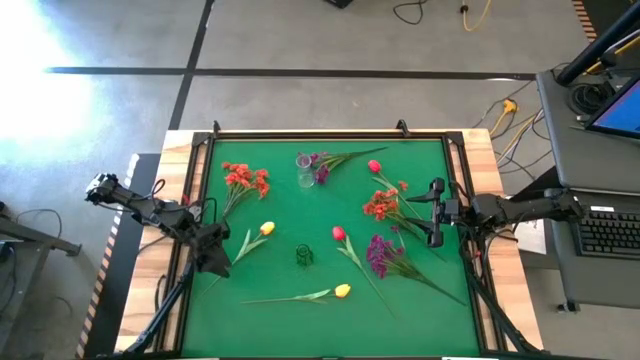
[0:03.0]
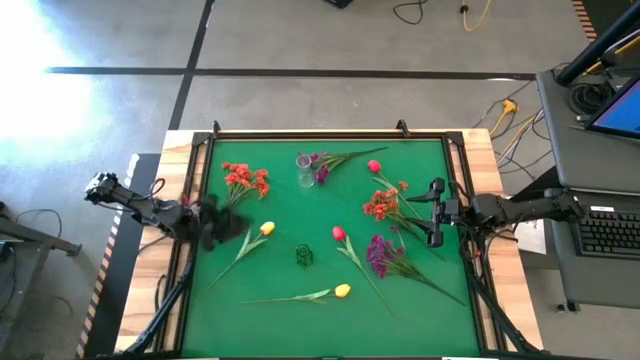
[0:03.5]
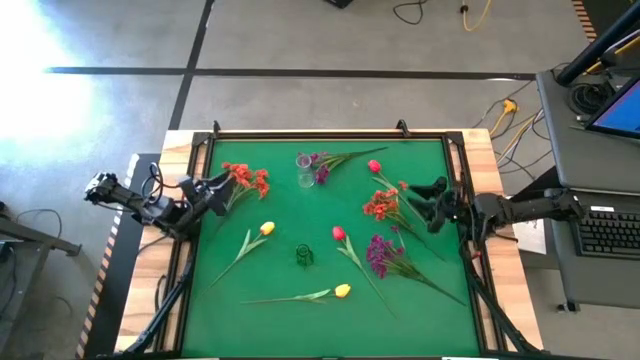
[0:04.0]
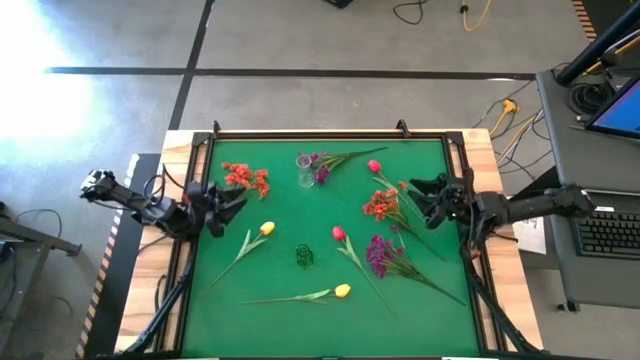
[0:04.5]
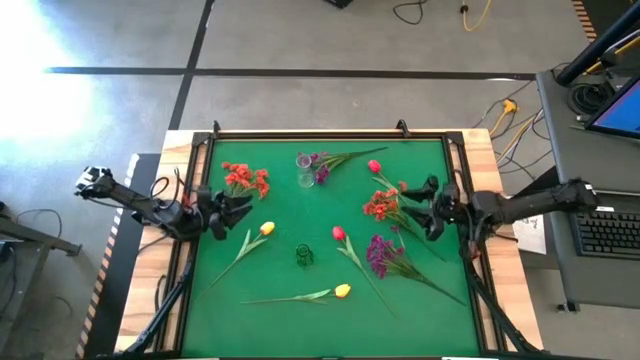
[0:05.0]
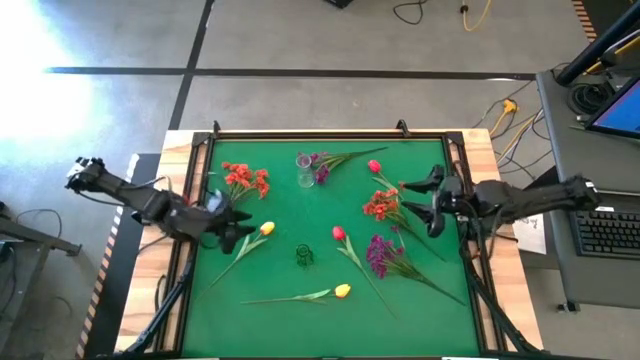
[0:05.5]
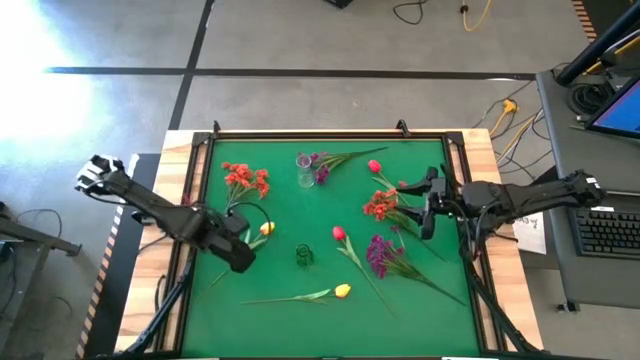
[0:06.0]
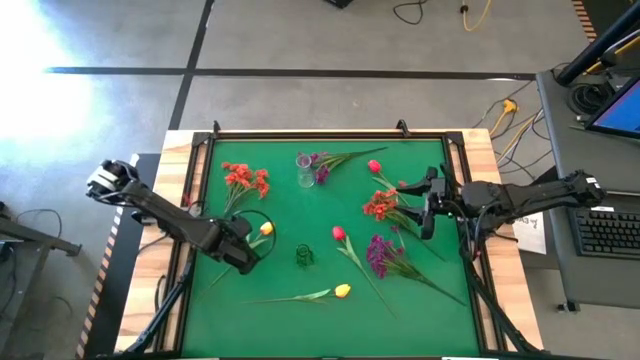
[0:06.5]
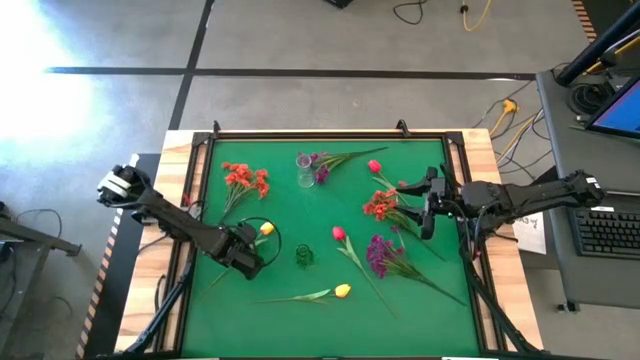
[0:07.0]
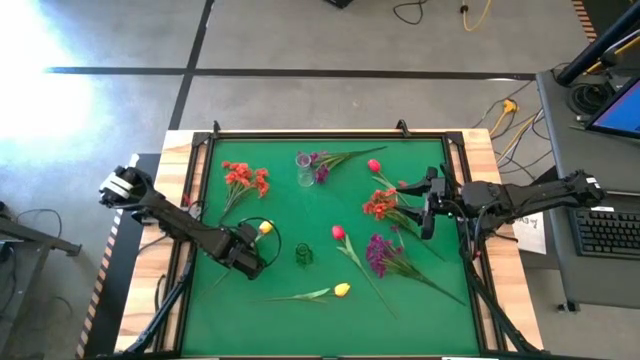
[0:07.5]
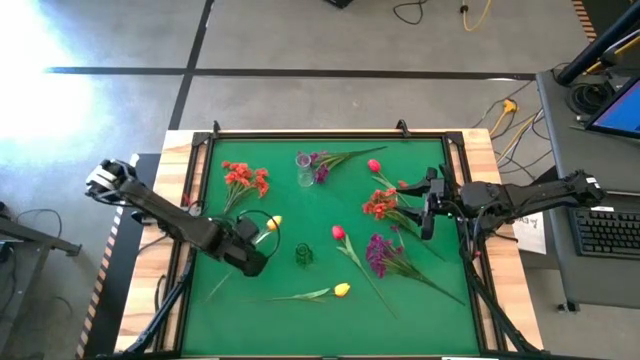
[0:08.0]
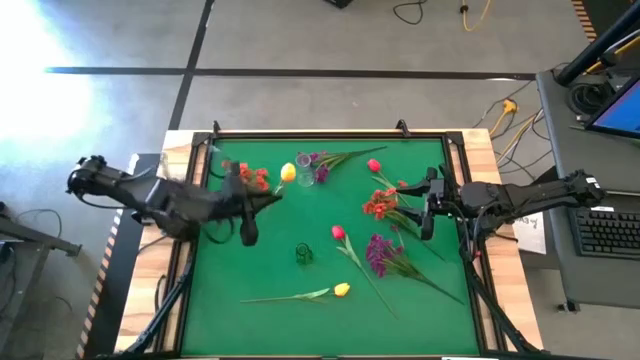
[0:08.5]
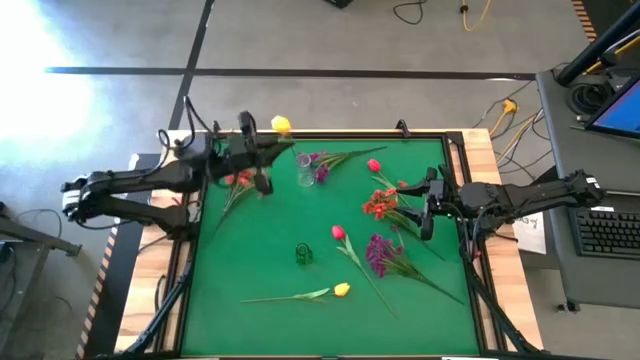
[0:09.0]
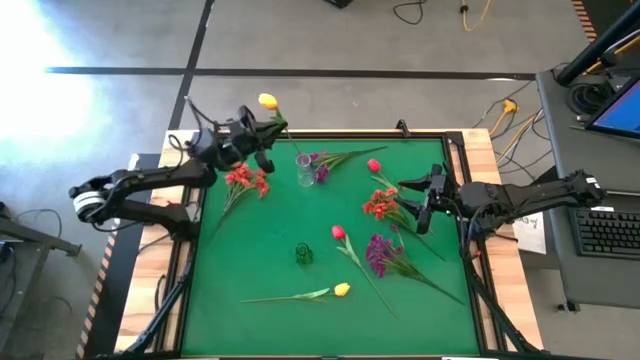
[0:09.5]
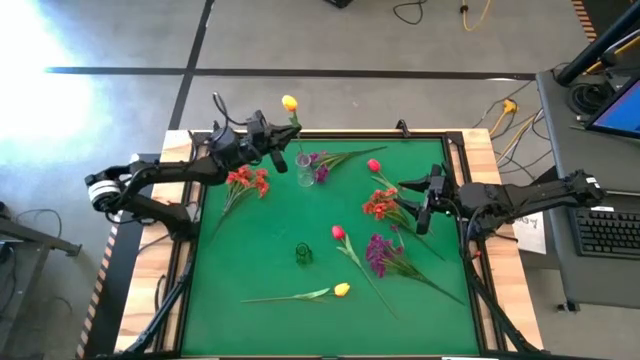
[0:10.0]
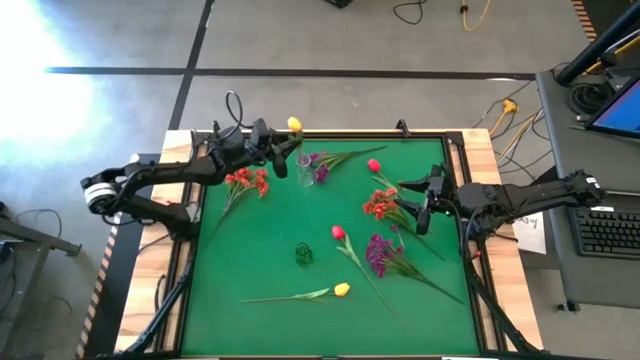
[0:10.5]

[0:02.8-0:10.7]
Task: Sort flowers into vase by color
Put the top yellow tulip into the transparent vase

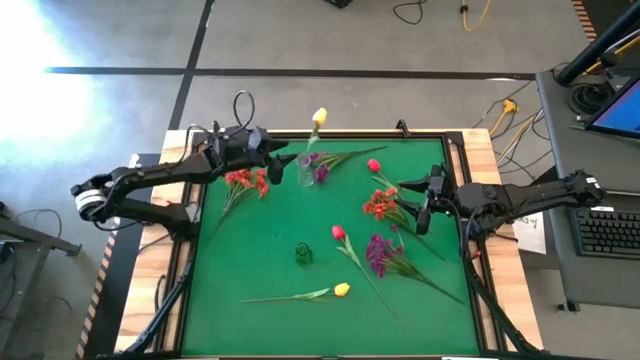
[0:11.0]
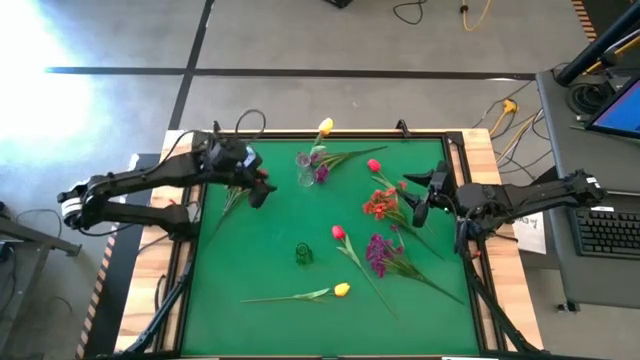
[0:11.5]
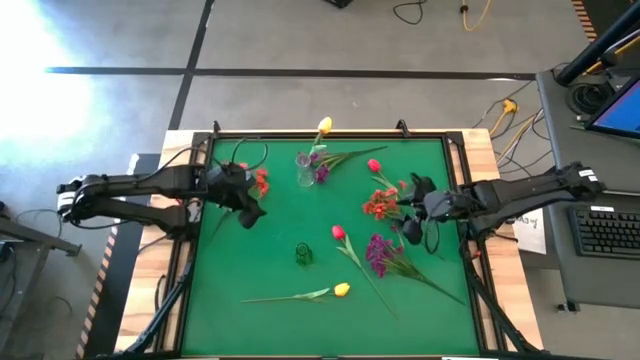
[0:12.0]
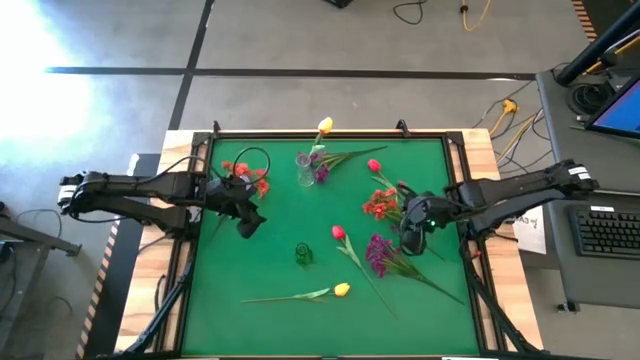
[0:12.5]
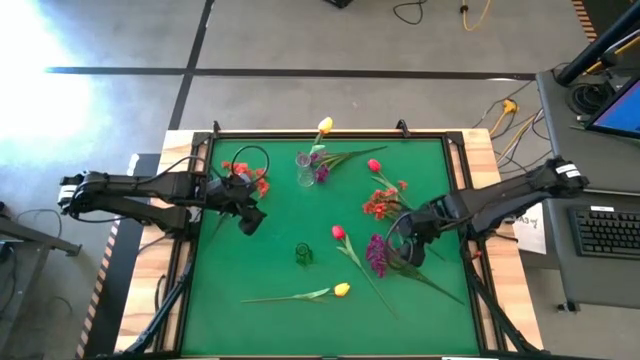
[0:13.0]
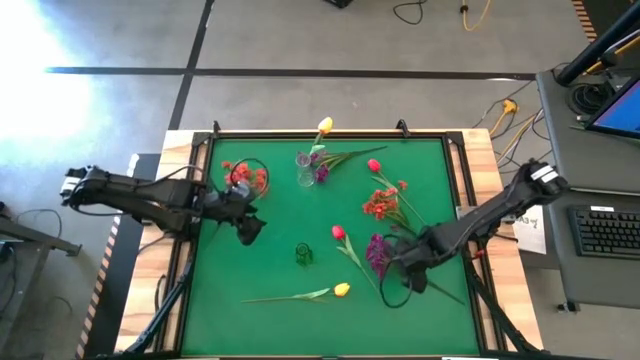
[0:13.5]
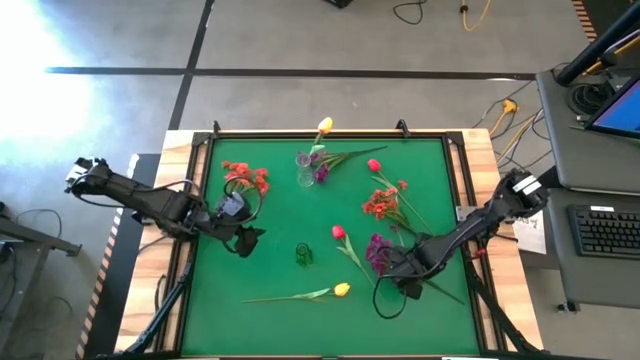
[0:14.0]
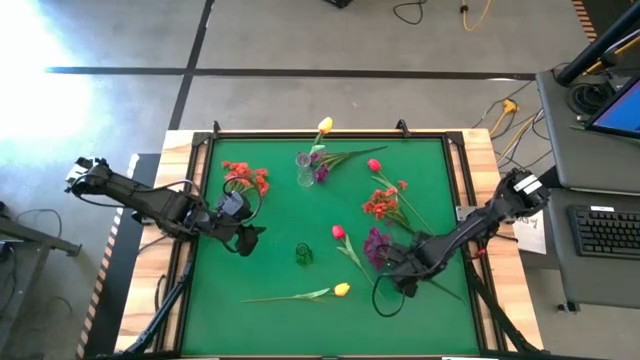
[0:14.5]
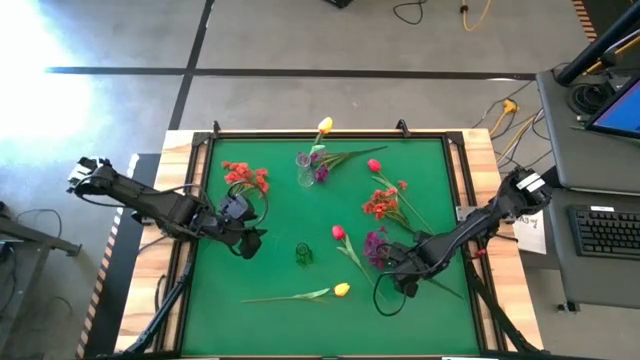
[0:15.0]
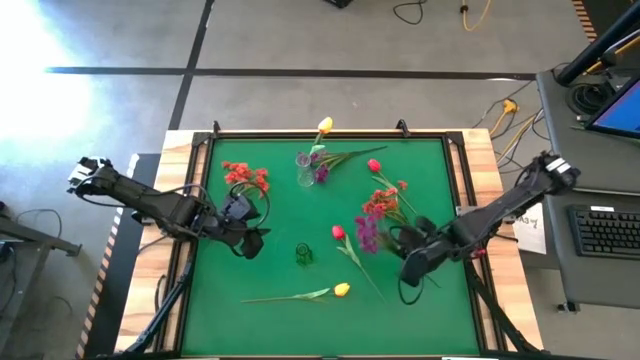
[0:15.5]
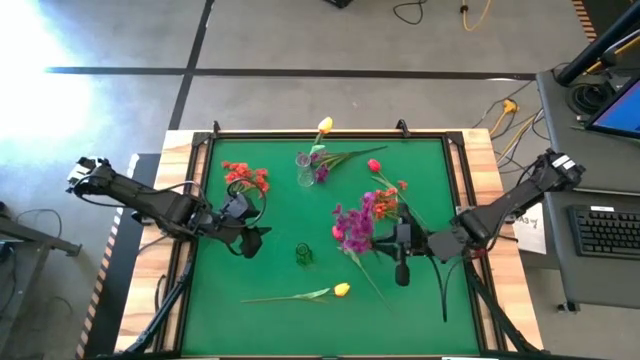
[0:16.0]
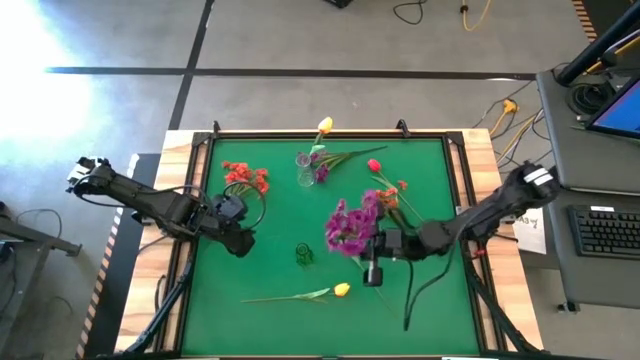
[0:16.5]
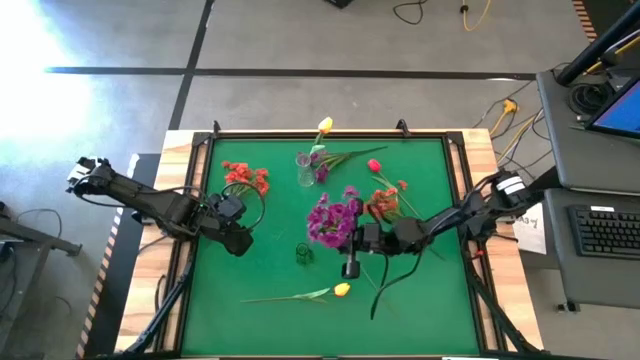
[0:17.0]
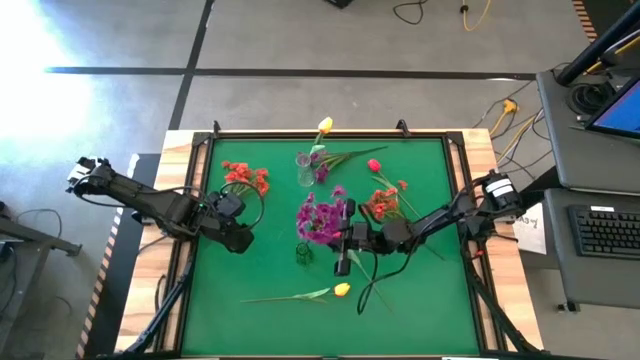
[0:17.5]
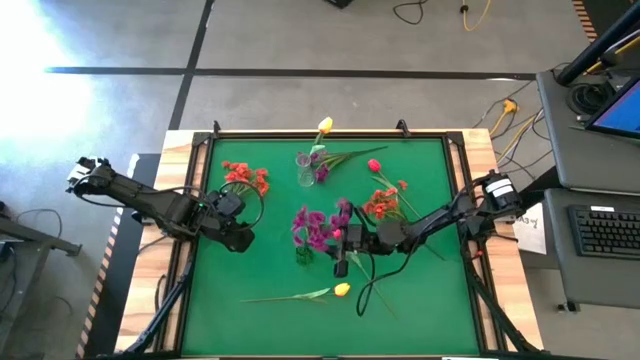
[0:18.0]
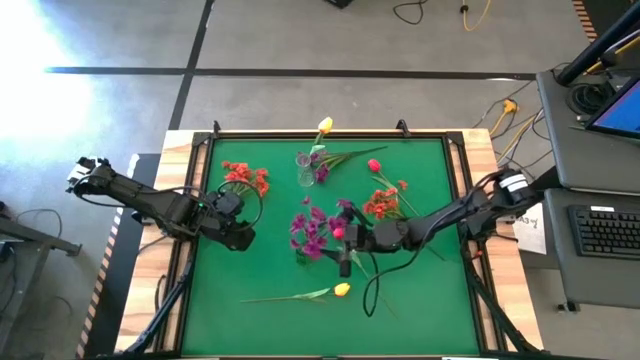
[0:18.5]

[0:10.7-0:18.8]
Put the bottom violet flowers into the green vase

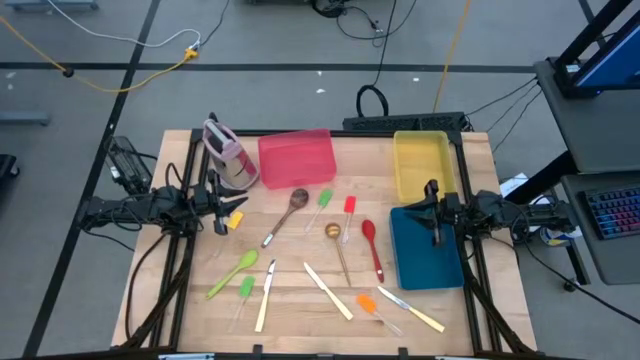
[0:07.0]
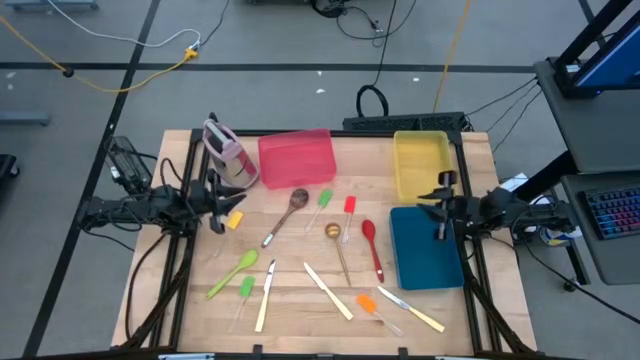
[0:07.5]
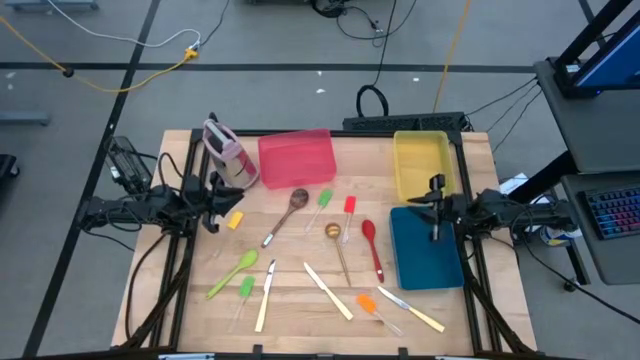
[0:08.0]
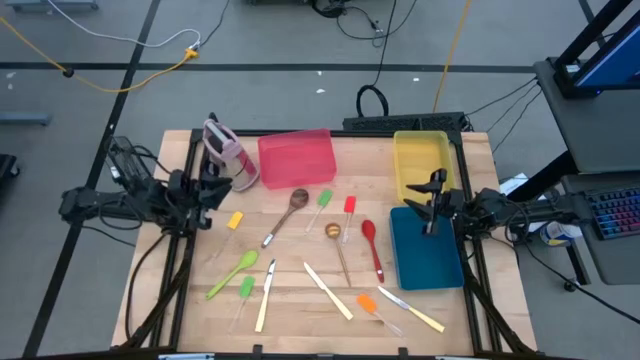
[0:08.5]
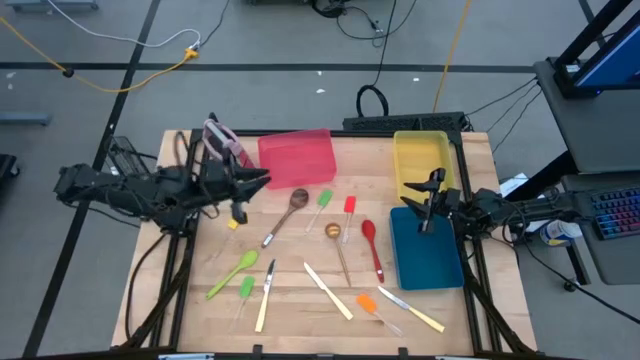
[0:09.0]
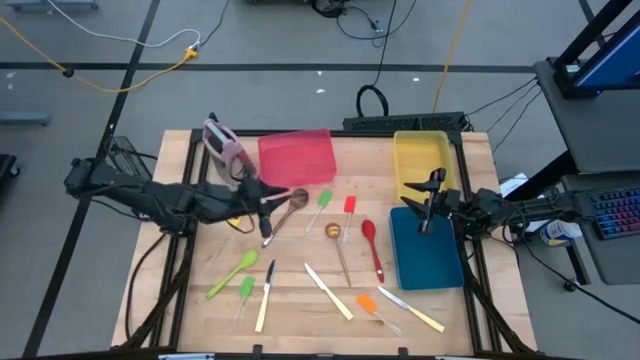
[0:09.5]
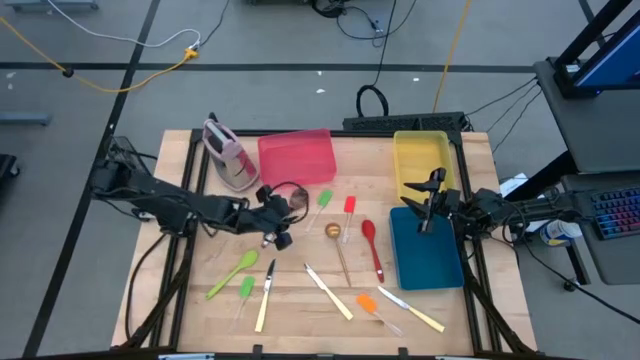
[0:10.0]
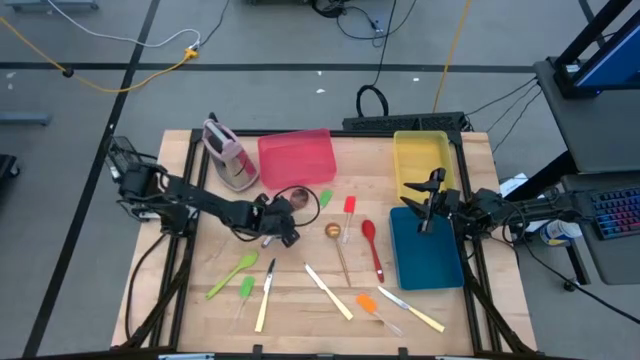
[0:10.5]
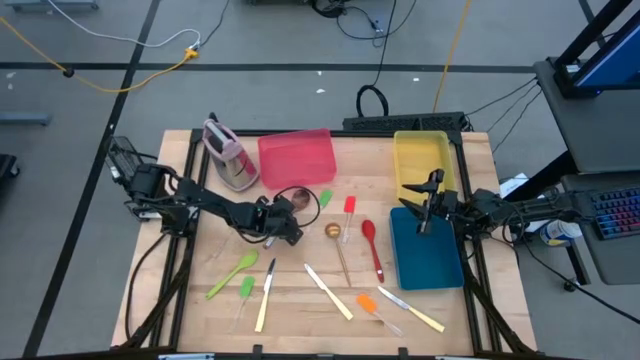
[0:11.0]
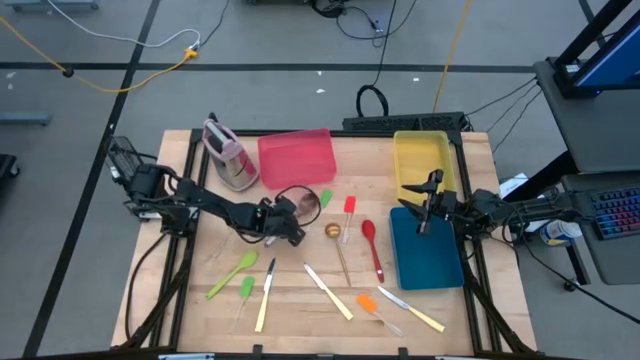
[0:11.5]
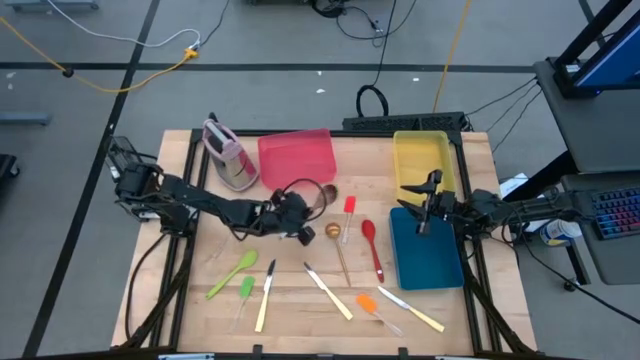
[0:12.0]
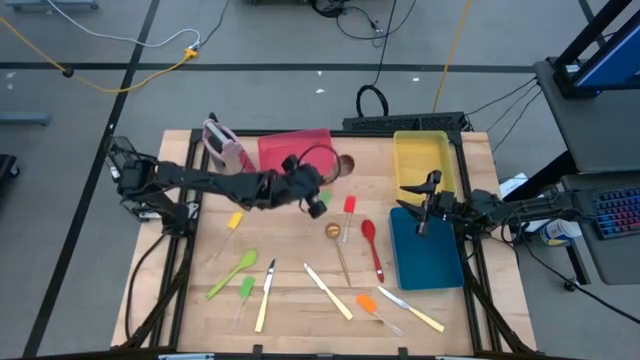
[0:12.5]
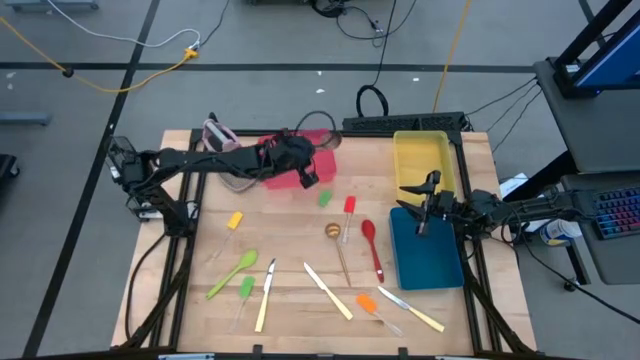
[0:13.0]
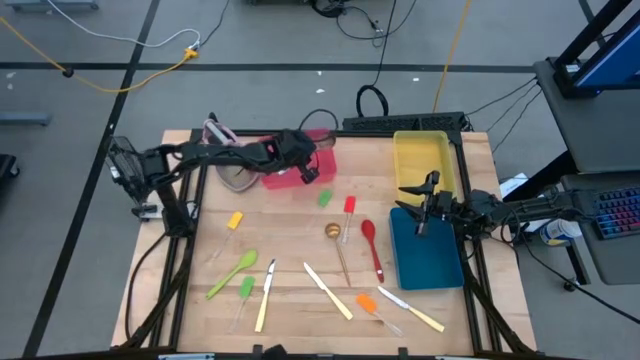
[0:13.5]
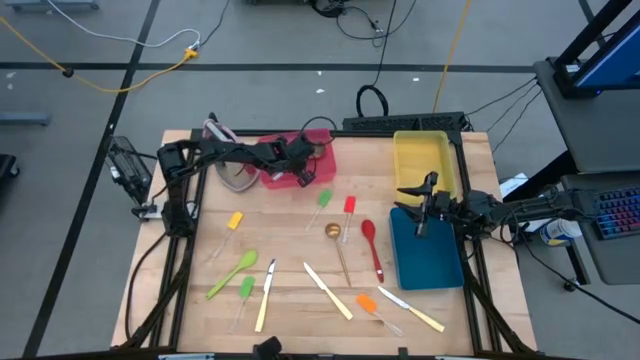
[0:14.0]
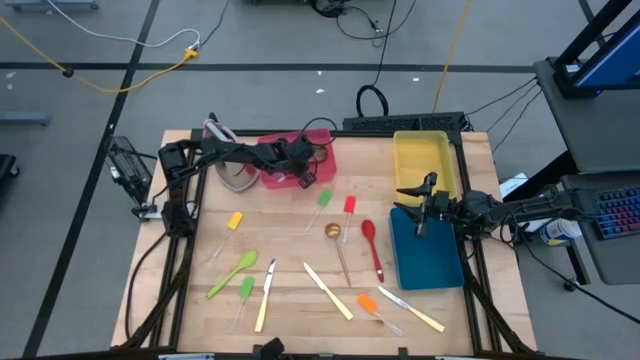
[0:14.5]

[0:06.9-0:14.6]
Task: Pick & Place Kitchen Items
Put the brown serving spoon into the red bin
